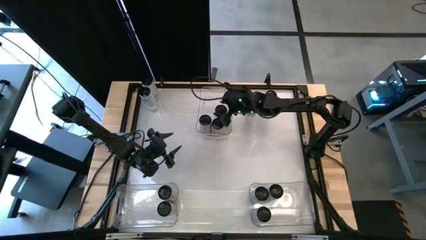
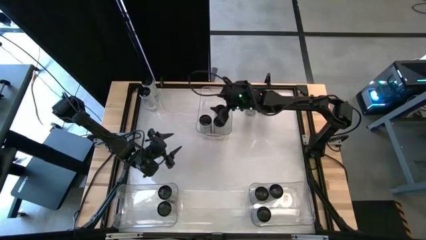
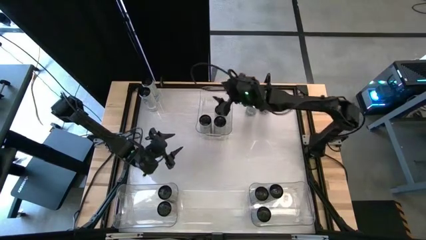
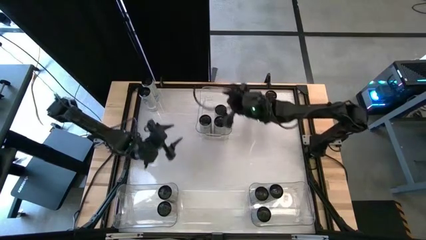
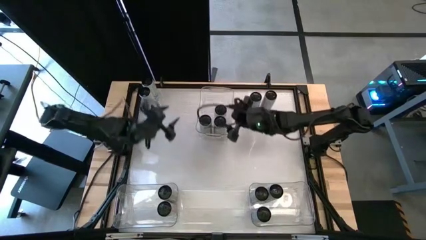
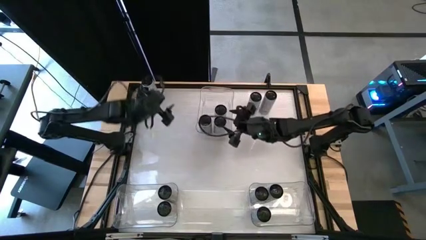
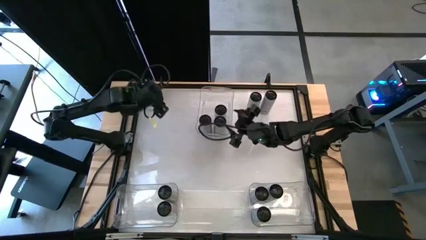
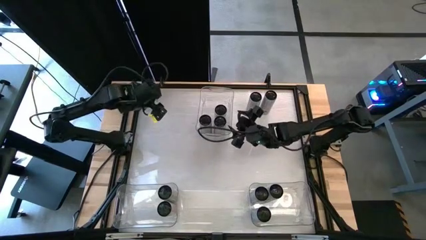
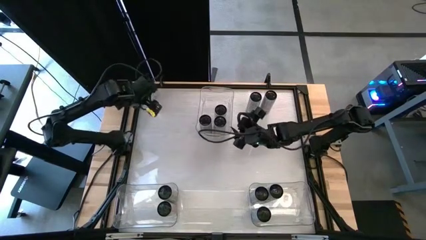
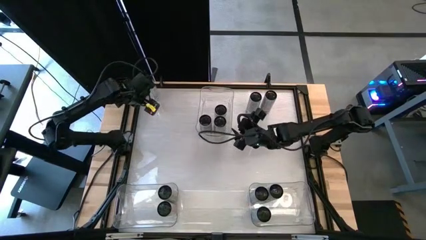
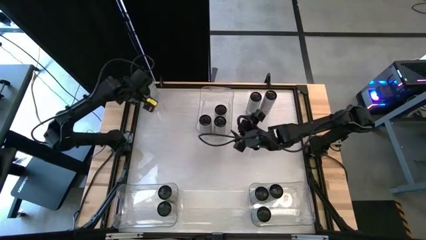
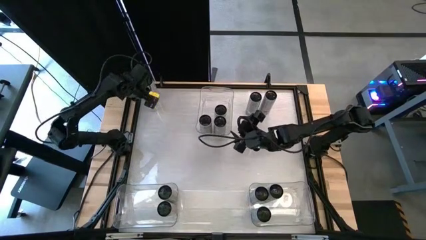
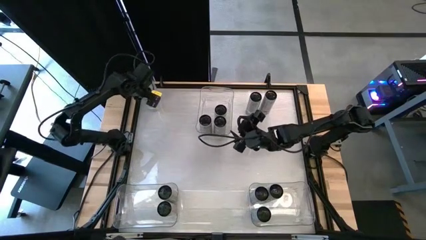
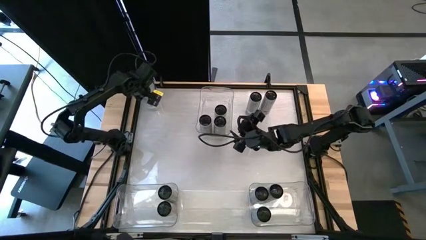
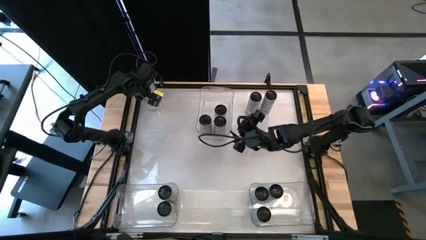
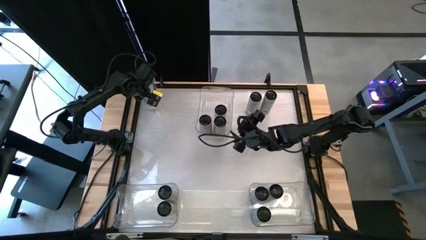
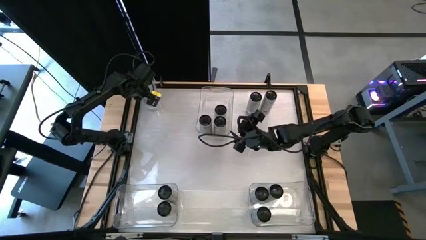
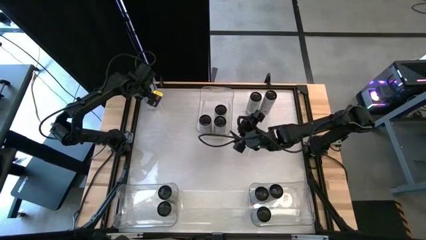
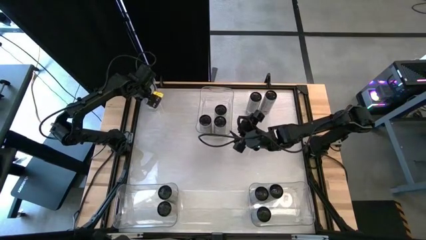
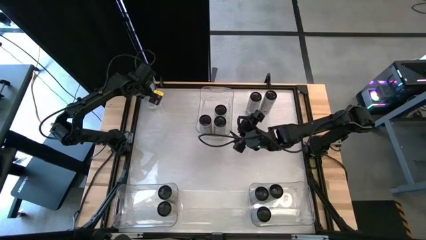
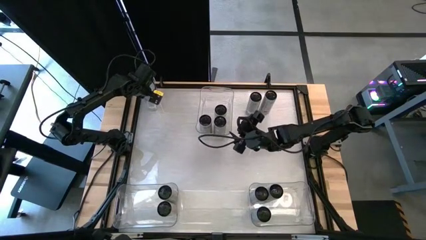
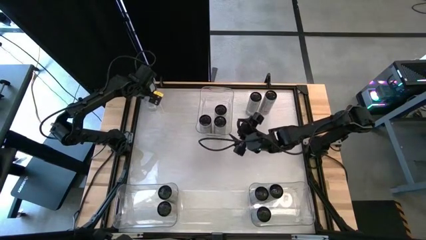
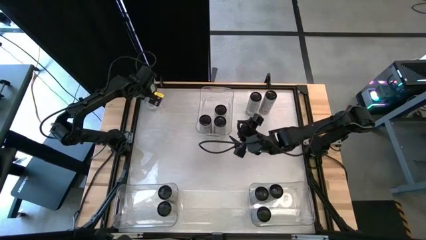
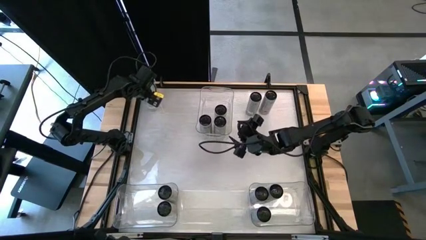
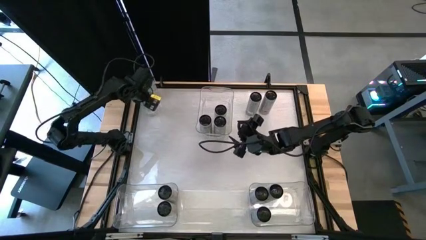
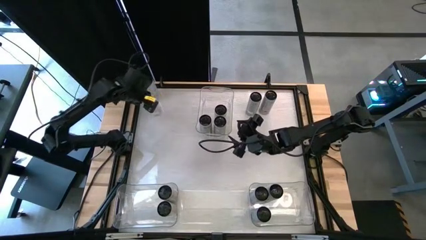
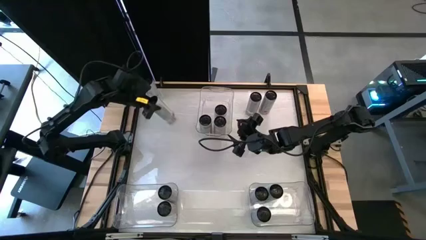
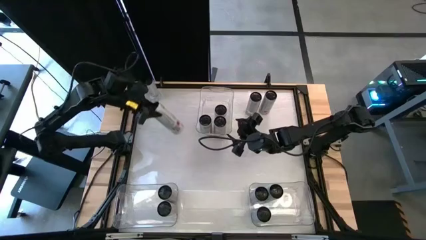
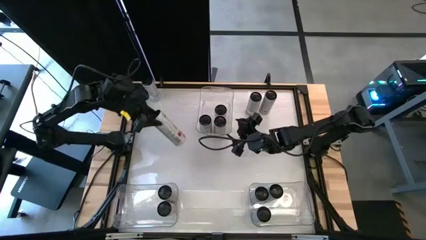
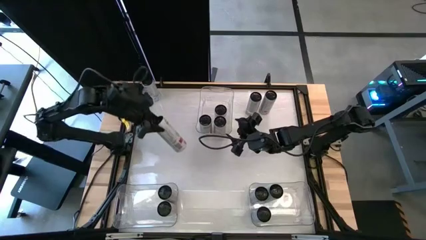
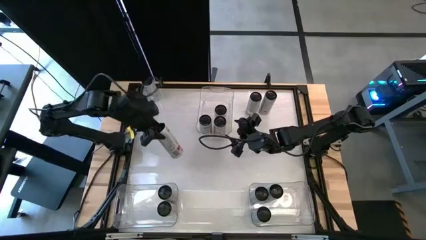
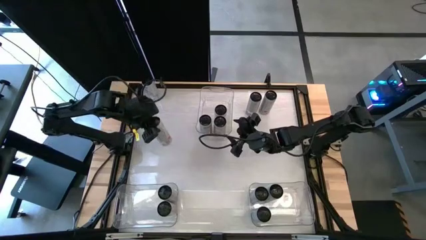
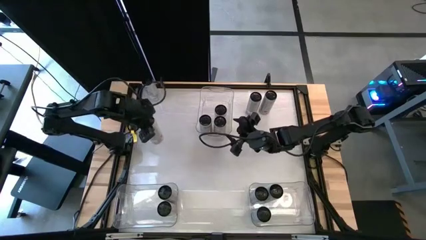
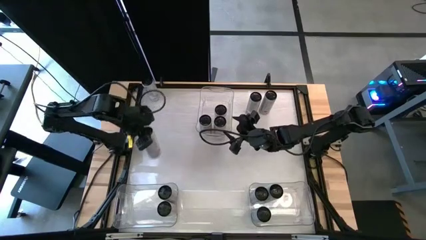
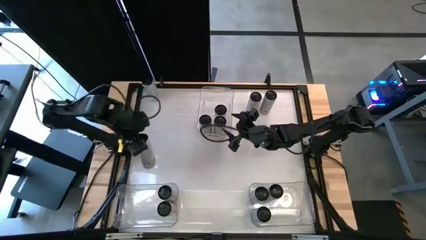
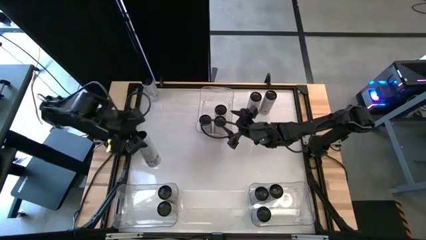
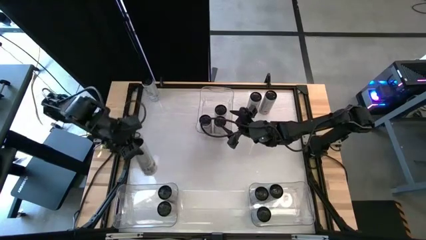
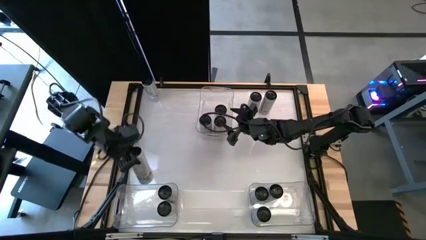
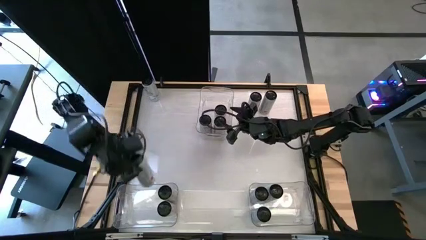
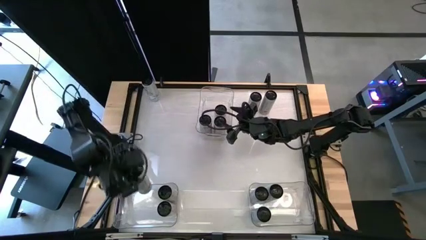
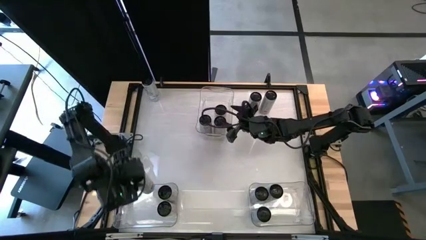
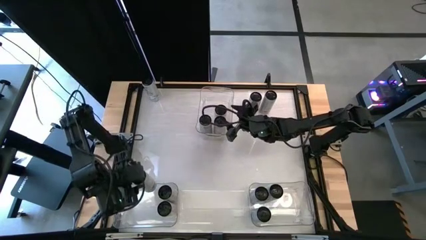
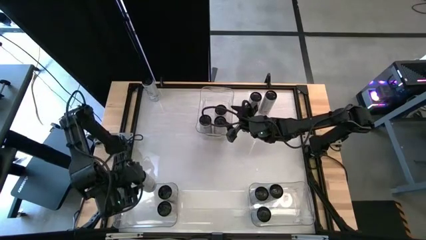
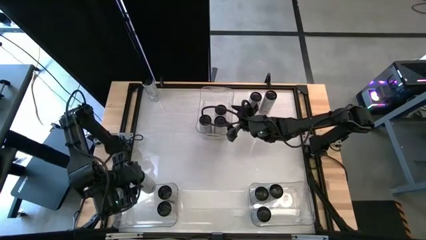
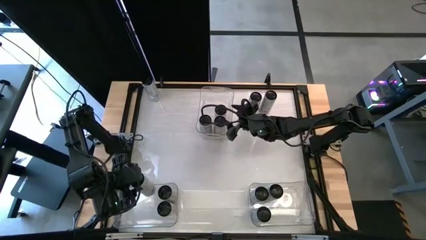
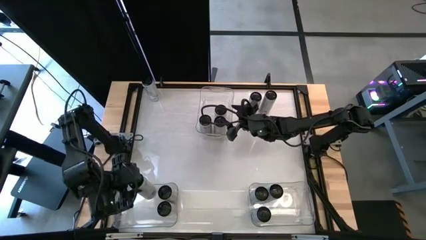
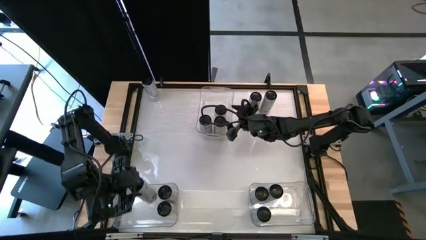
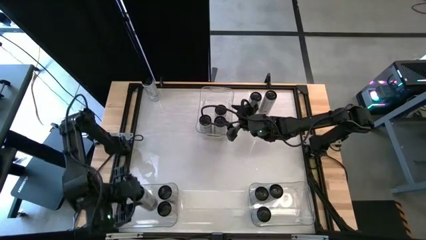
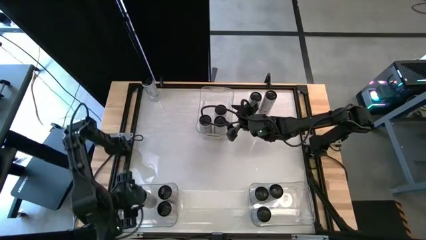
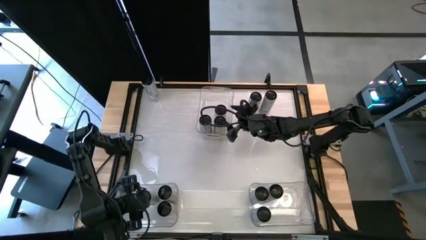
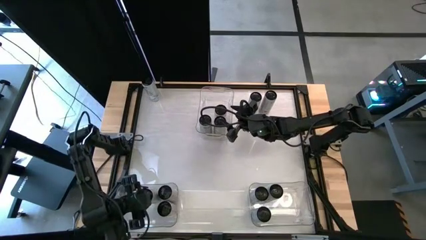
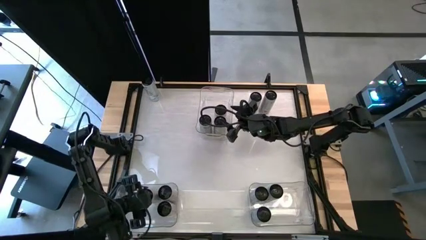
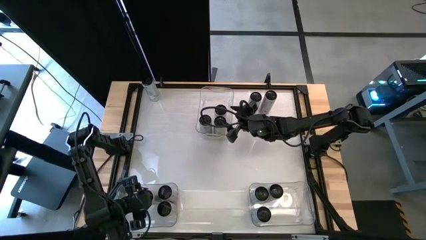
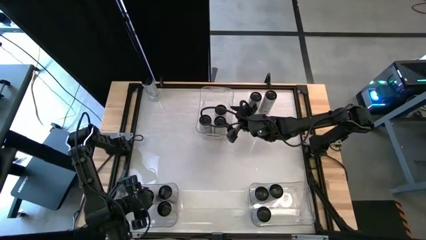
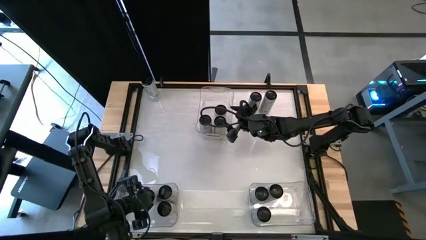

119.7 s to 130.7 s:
Task: Sort soda cans
Put the left white pink soda can into the bottom left transparent bin
